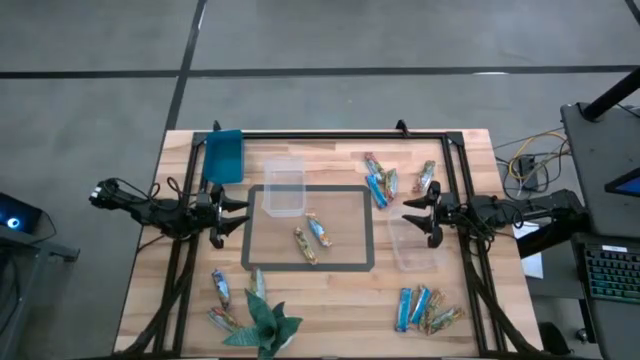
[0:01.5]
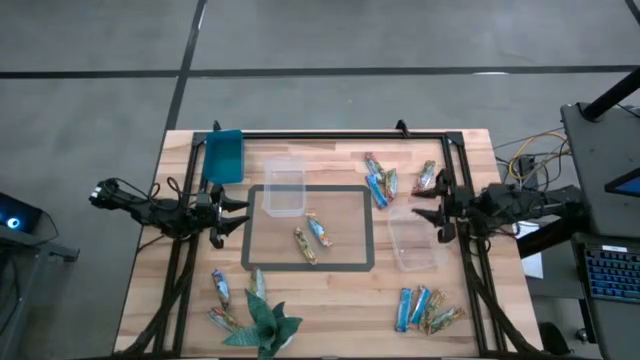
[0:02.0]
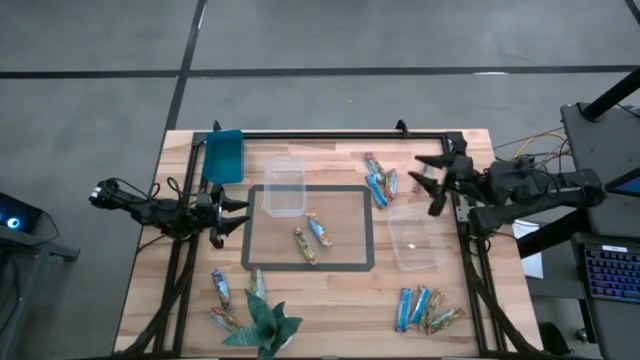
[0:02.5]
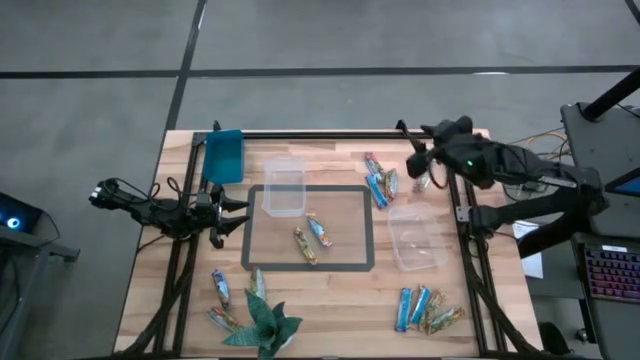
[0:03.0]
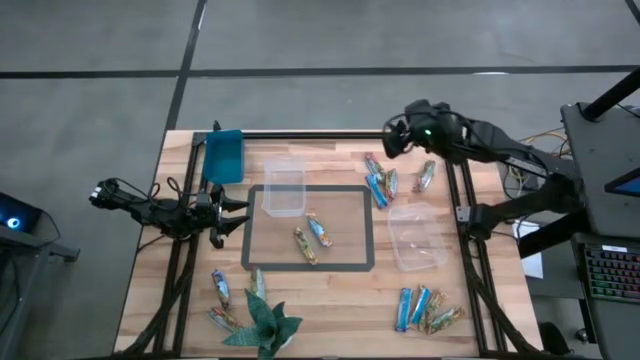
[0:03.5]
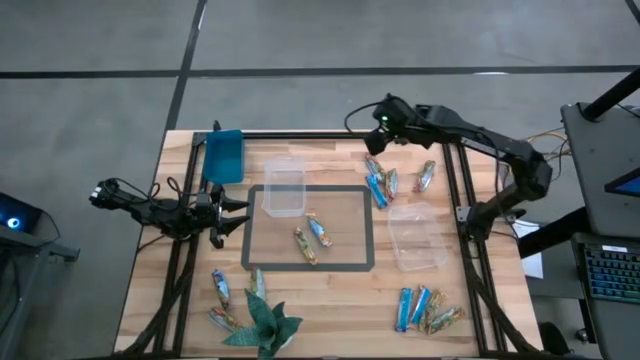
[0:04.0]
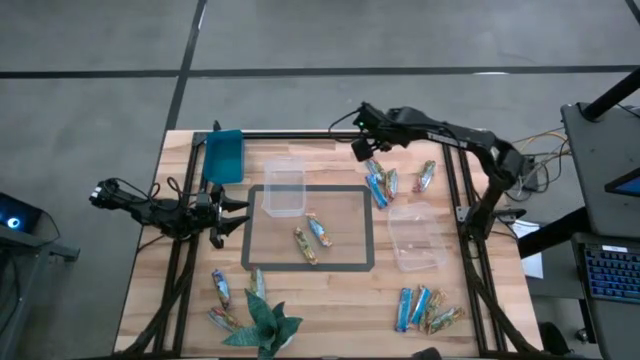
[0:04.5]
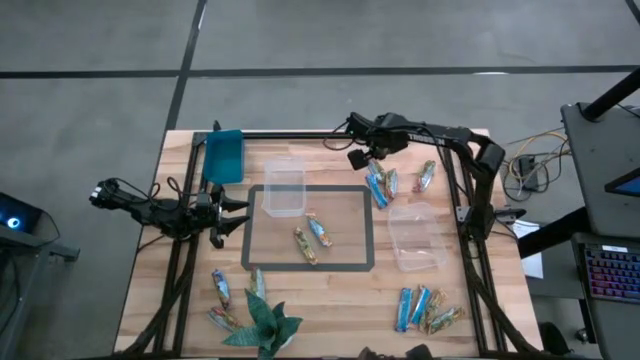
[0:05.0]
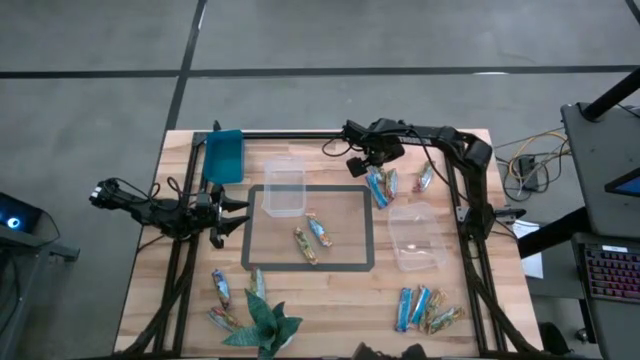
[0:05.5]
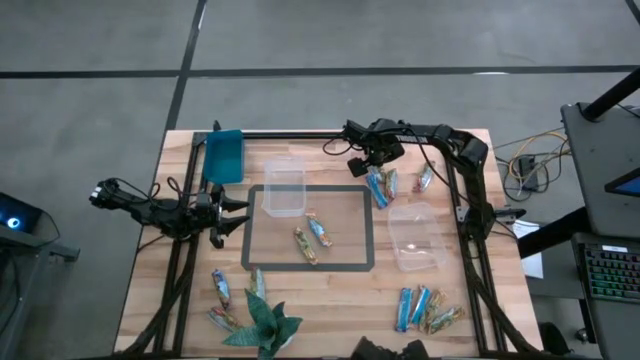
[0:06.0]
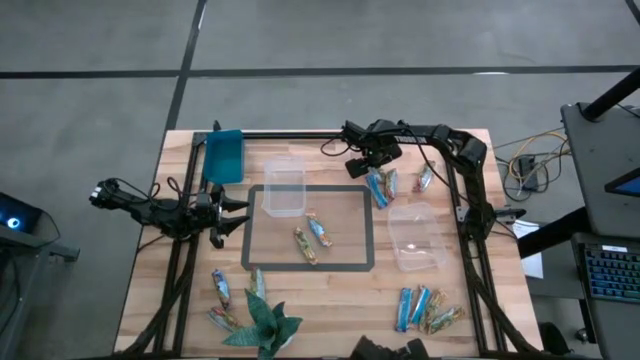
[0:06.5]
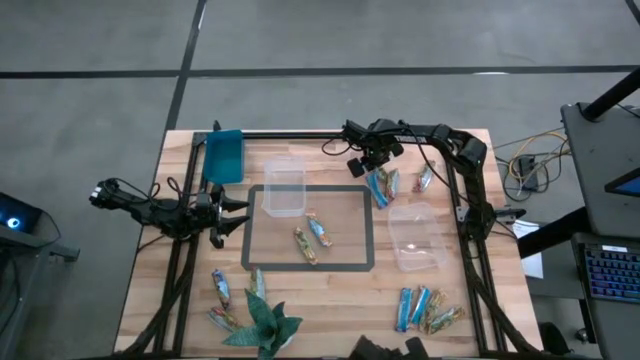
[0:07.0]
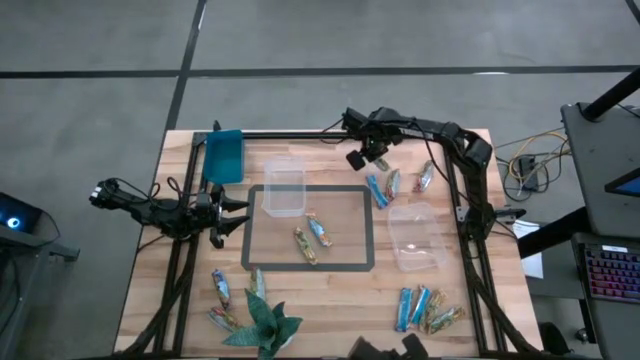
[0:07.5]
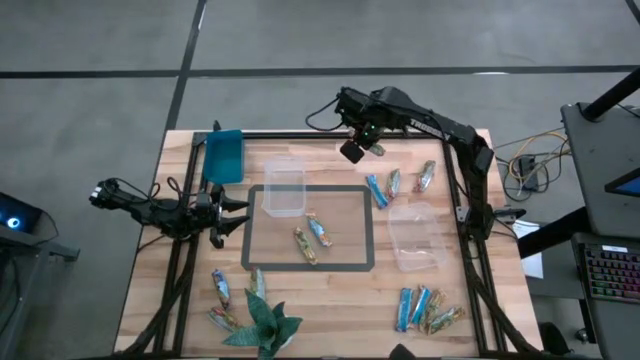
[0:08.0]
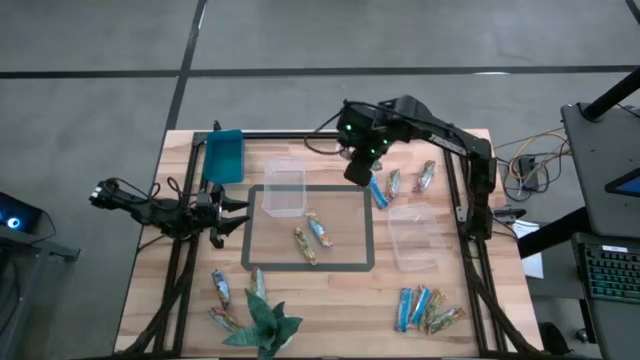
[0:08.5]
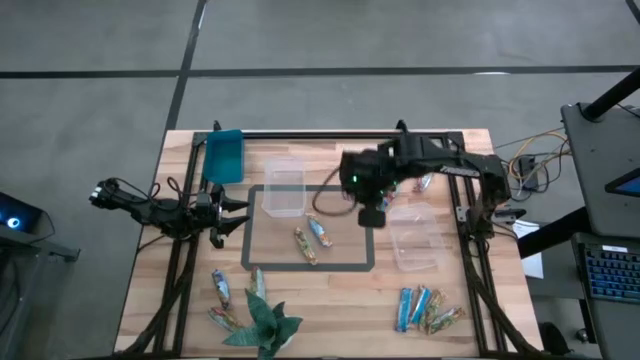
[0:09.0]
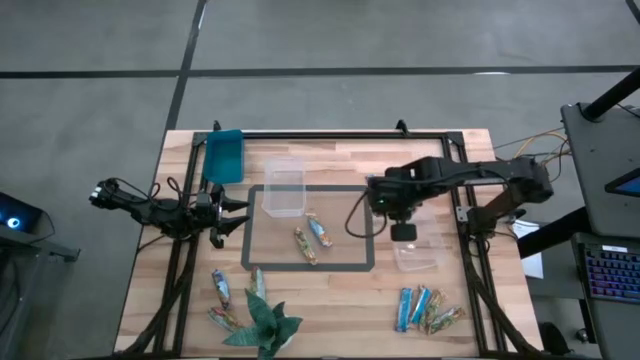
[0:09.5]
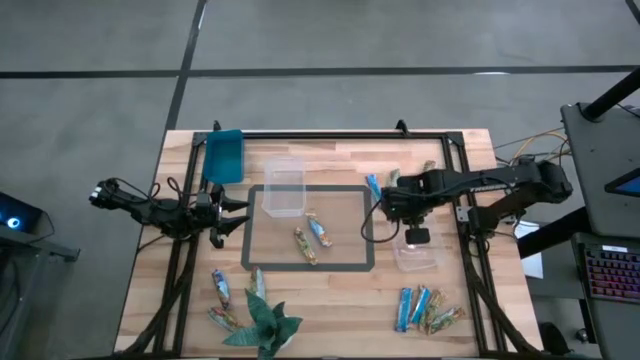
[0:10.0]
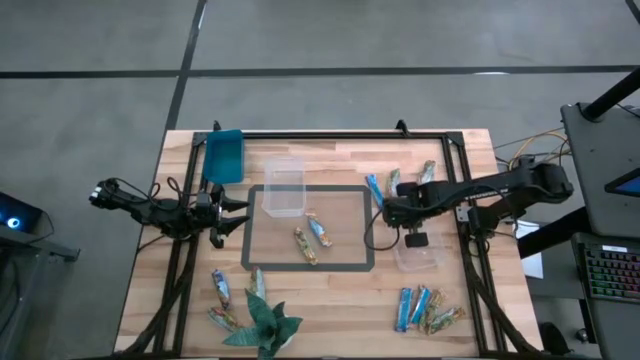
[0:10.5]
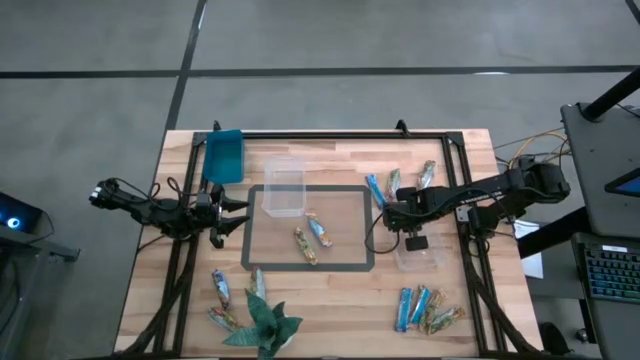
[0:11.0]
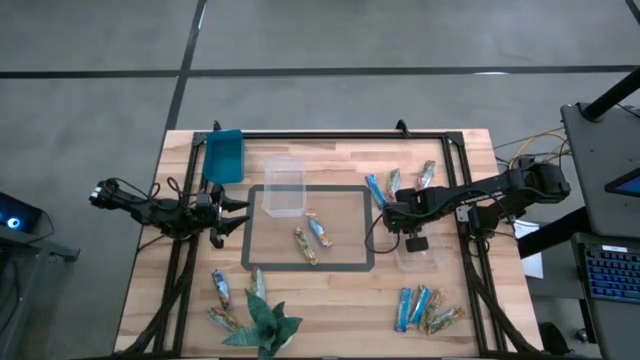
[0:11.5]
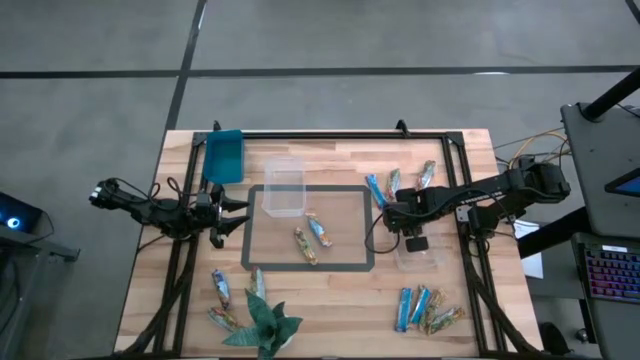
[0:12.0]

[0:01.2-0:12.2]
Task: Pick and place Granola Bars by type
Put the red granola bar into the right transparent bin

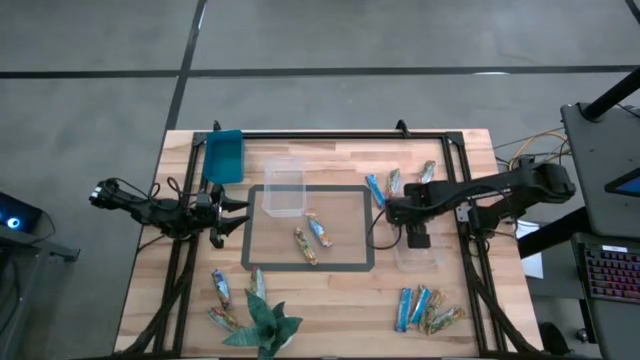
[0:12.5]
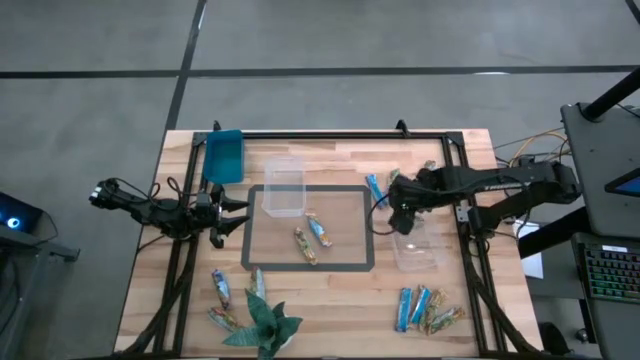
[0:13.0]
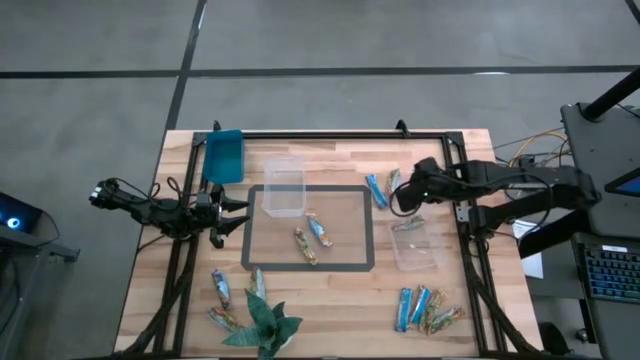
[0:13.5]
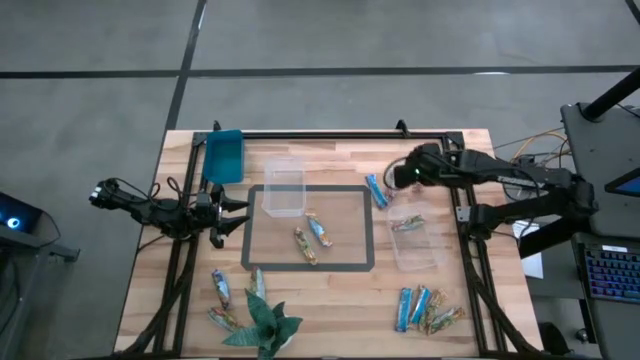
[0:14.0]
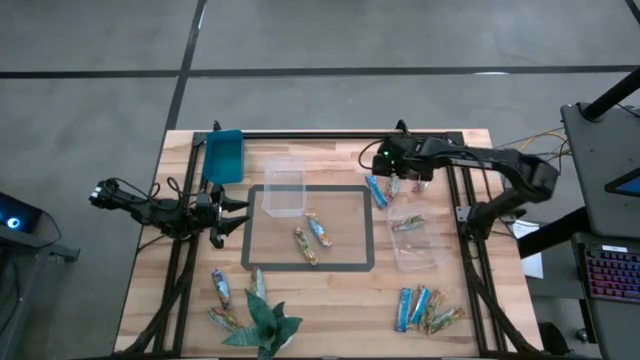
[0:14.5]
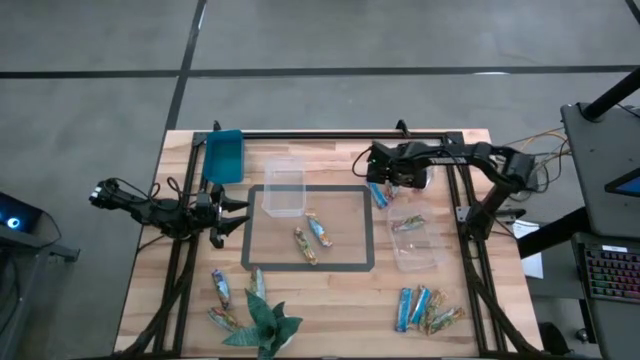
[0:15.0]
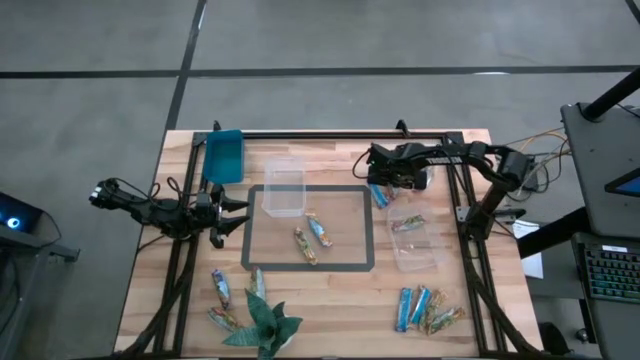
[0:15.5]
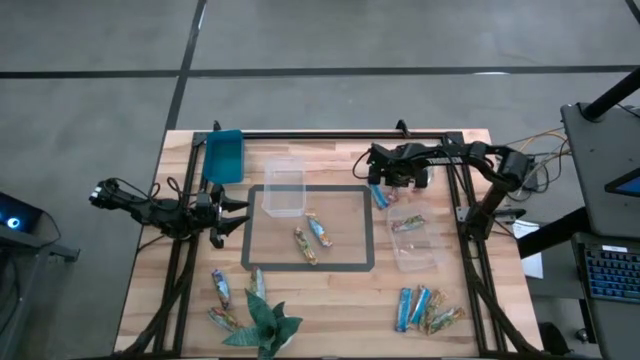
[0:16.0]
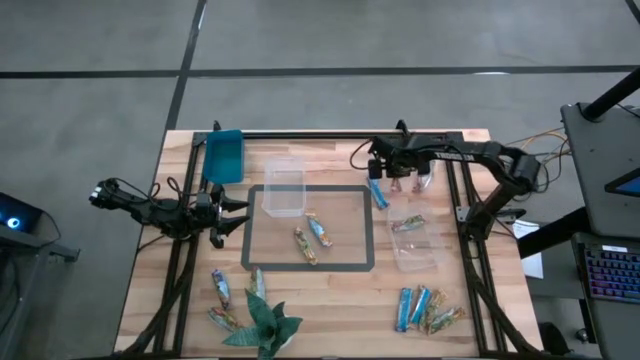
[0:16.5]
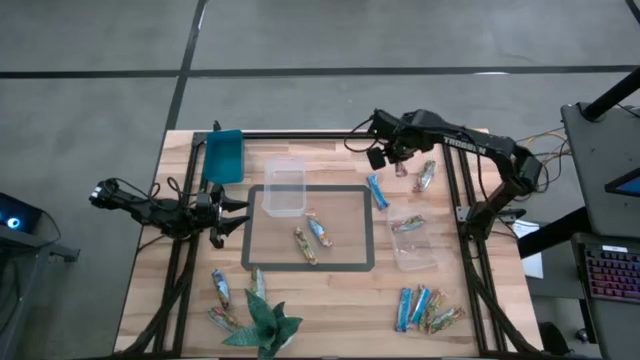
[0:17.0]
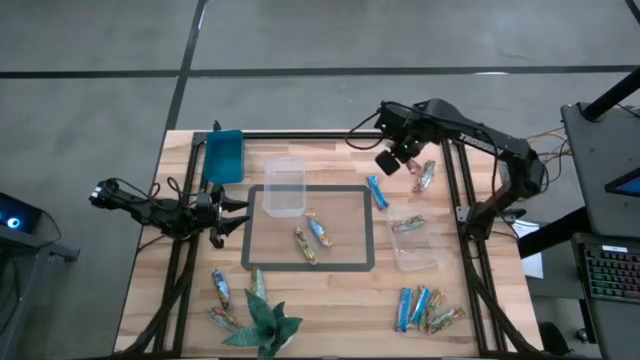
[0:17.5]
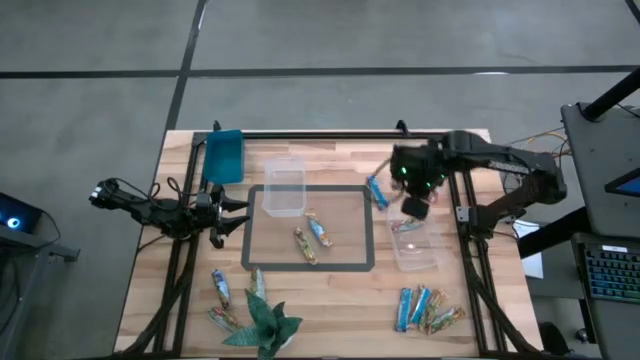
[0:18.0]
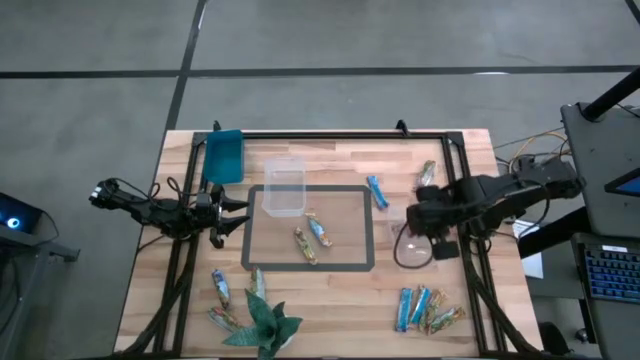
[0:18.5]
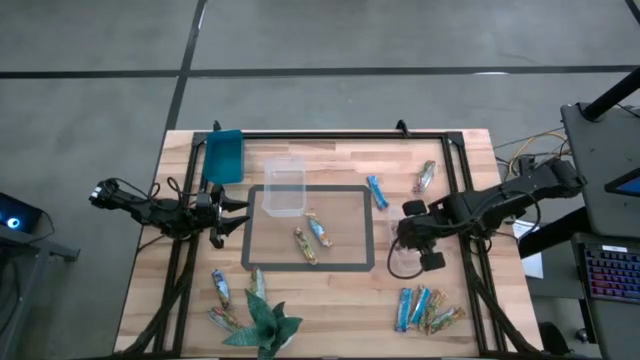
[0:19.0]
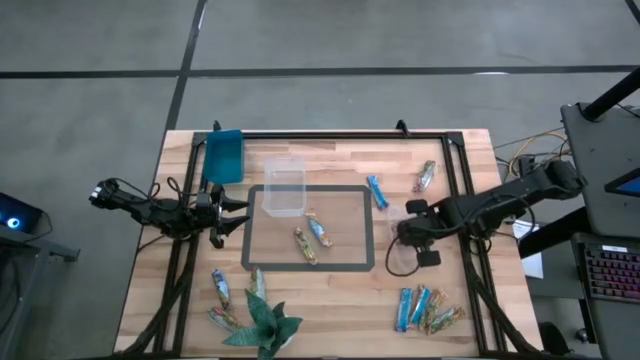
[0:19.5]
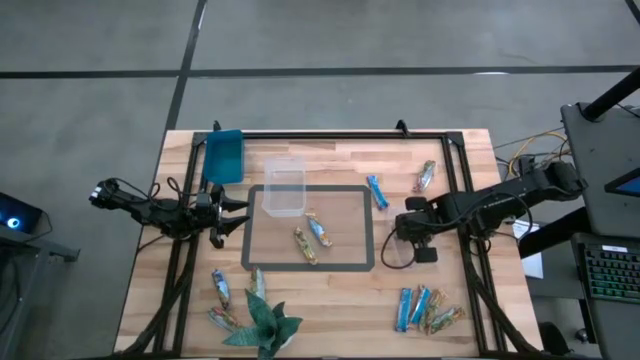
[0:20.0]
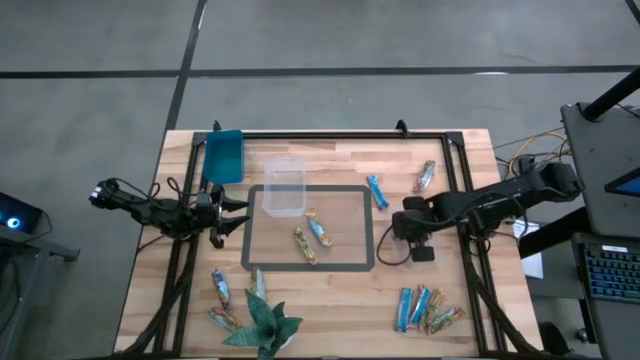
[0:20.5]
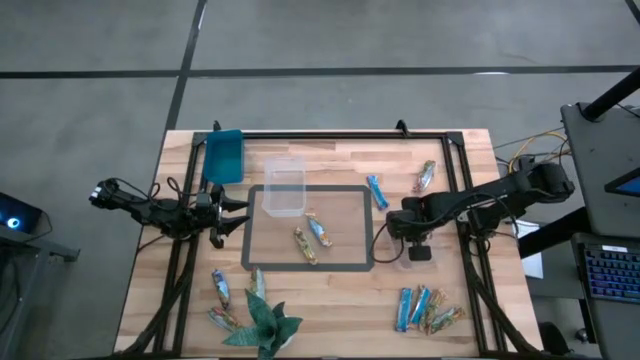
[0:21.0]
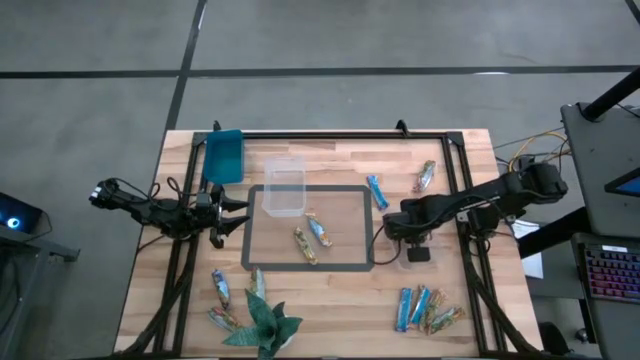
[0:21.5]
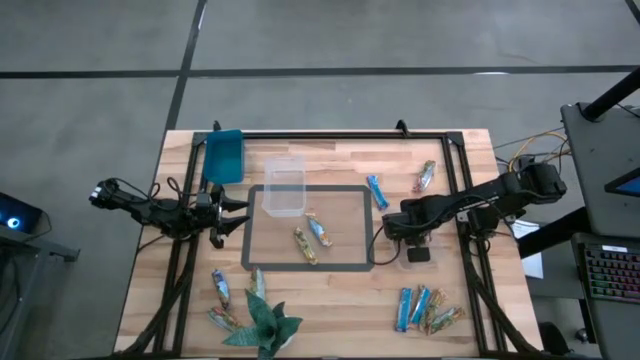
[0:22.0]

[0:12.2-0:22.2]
Put the red granola bar into the right transparent bin

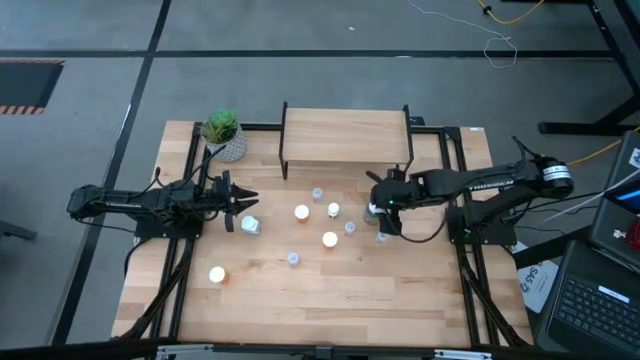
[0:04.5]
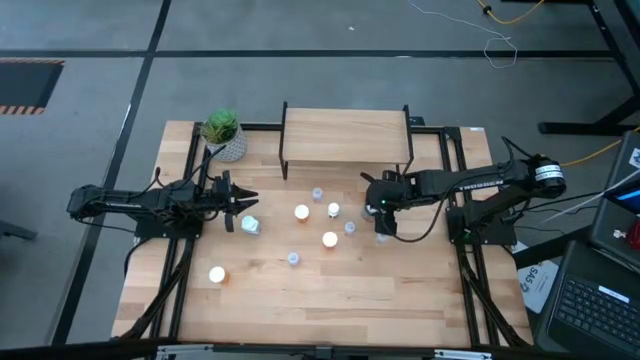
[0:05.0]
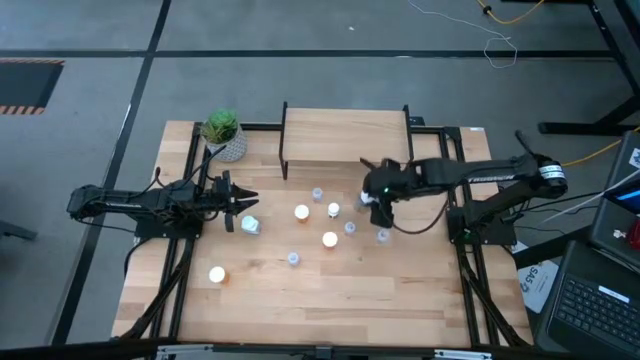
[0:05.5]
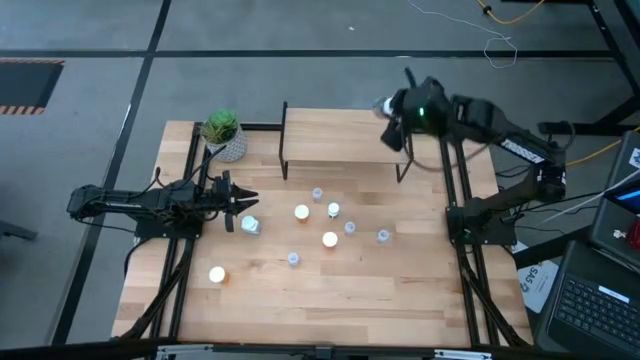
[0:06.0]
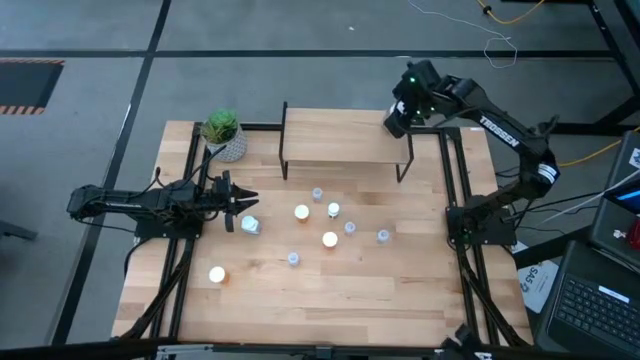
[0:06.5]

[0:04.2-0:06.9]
Task: Pick and place medicine bottles onto shelf by color
Put the green pill bottle on the shelf
